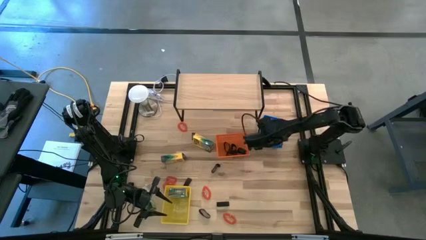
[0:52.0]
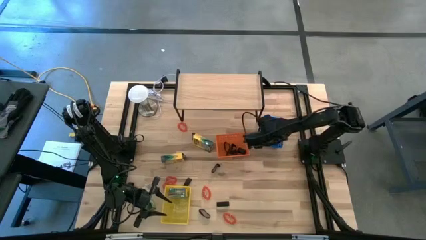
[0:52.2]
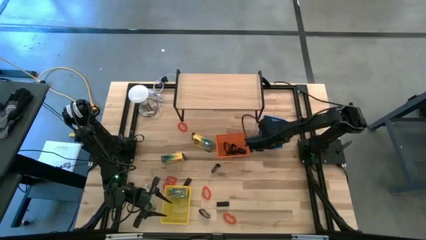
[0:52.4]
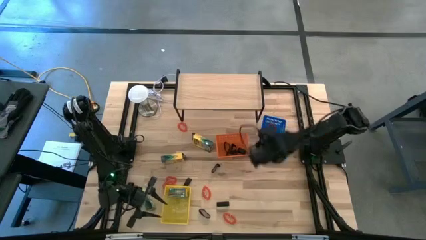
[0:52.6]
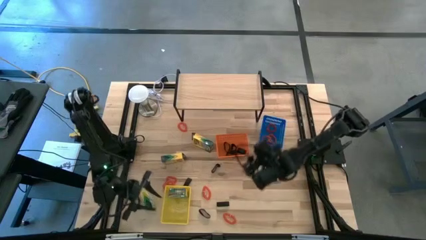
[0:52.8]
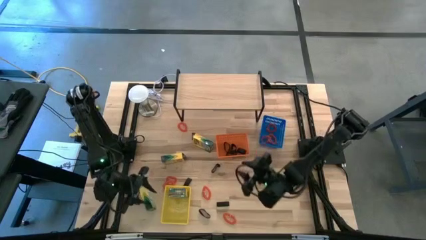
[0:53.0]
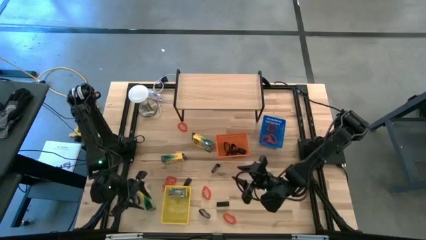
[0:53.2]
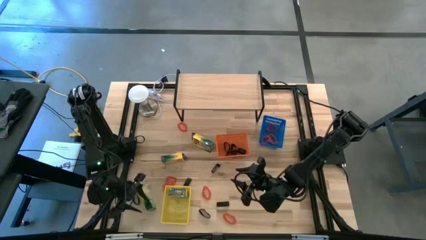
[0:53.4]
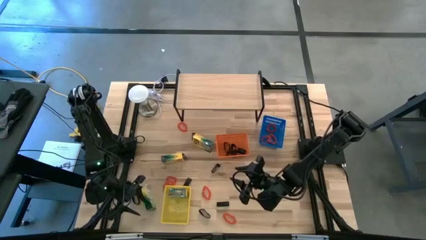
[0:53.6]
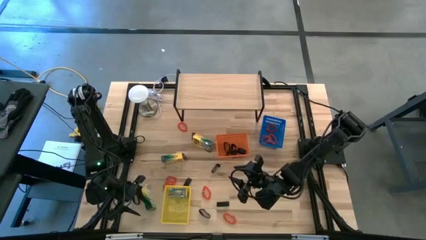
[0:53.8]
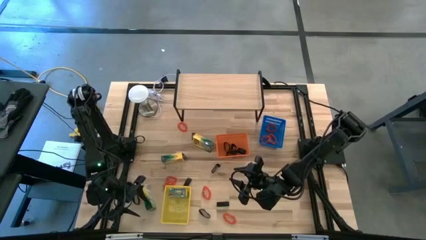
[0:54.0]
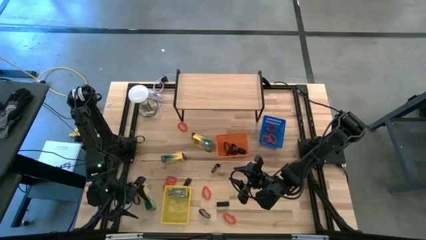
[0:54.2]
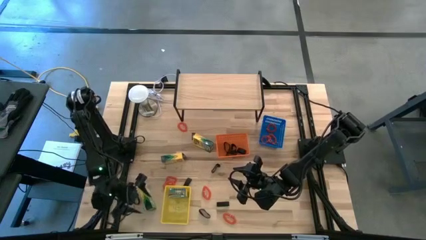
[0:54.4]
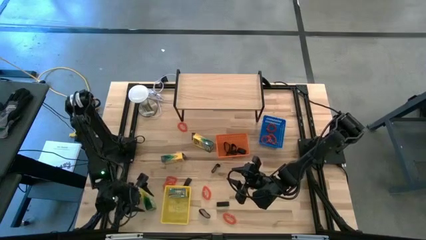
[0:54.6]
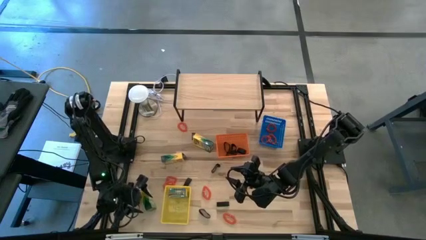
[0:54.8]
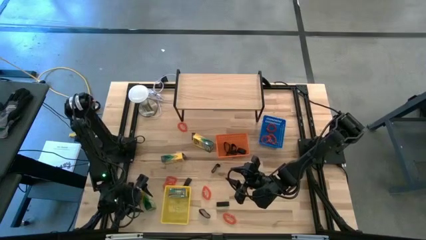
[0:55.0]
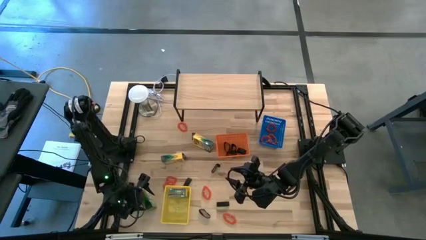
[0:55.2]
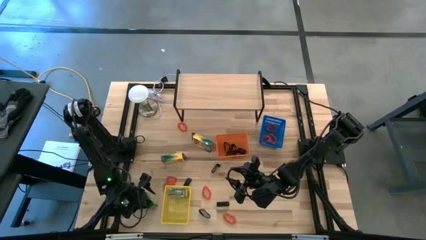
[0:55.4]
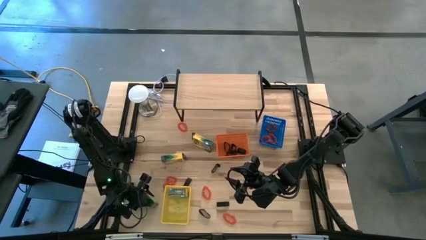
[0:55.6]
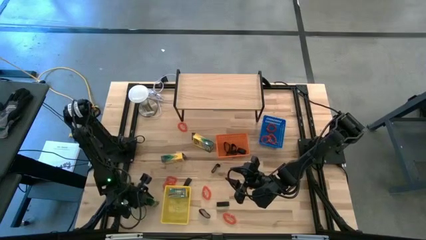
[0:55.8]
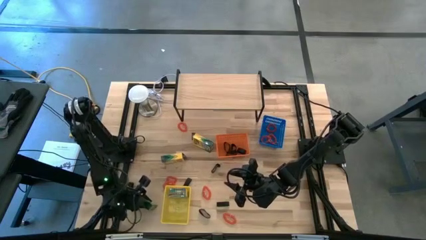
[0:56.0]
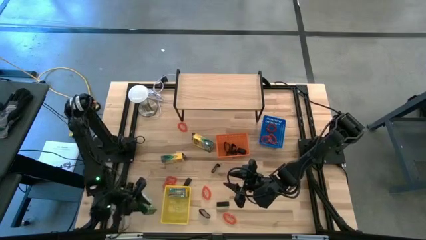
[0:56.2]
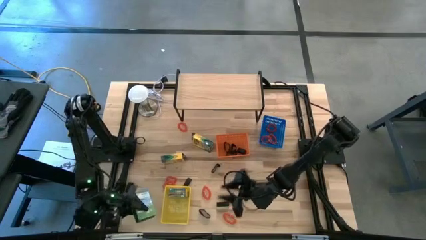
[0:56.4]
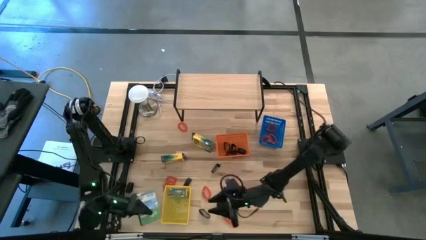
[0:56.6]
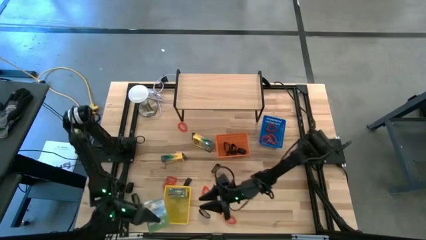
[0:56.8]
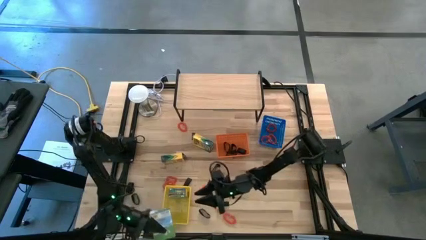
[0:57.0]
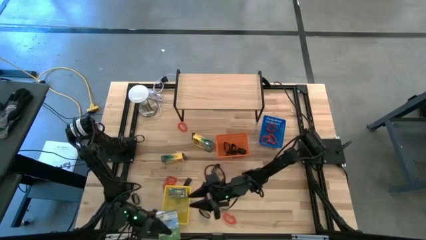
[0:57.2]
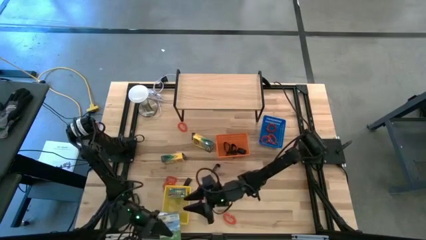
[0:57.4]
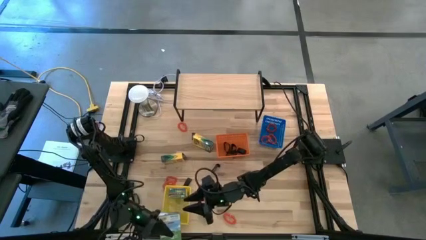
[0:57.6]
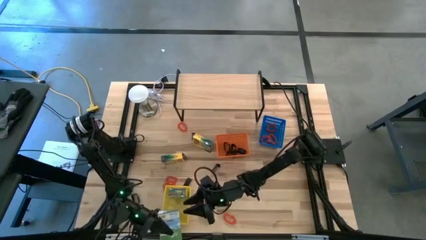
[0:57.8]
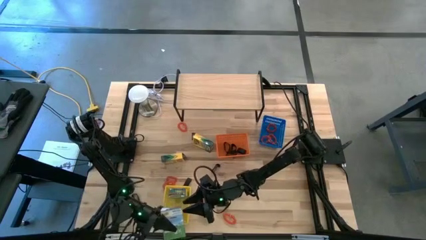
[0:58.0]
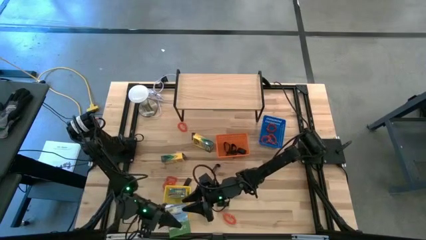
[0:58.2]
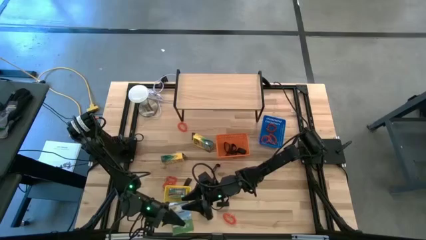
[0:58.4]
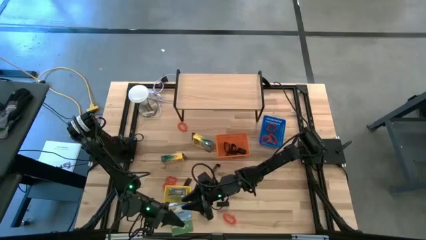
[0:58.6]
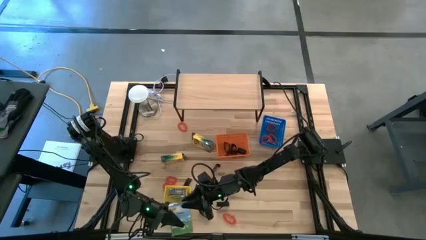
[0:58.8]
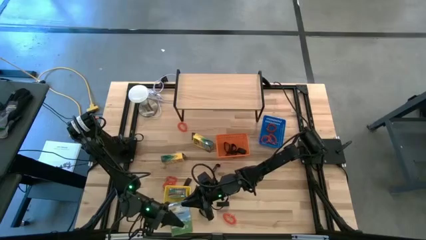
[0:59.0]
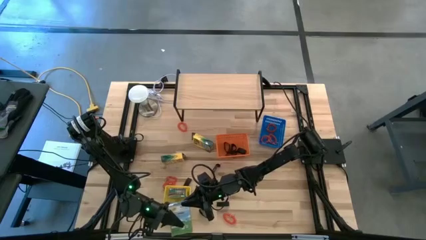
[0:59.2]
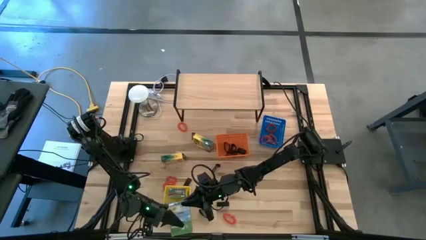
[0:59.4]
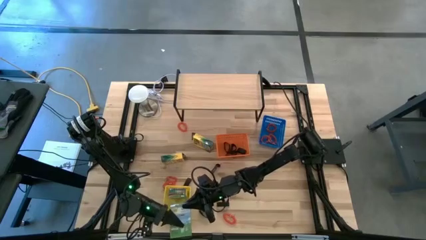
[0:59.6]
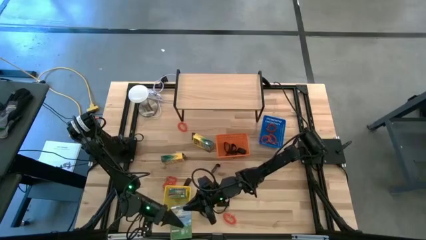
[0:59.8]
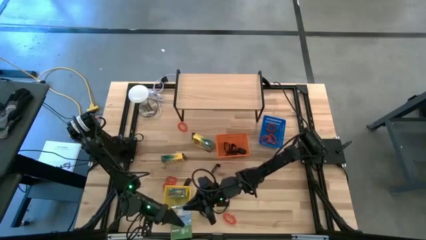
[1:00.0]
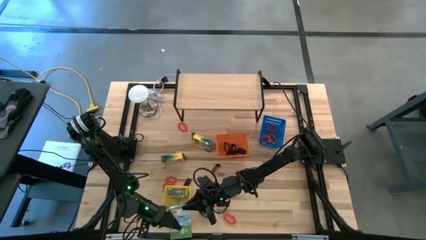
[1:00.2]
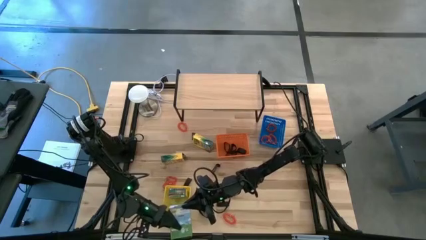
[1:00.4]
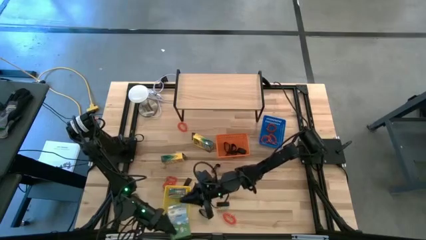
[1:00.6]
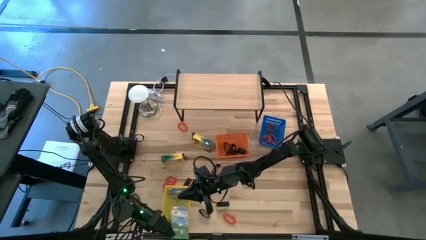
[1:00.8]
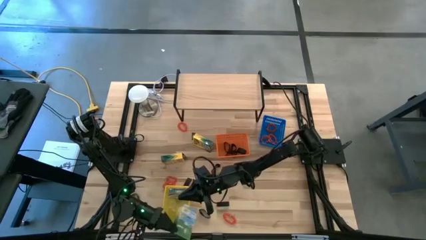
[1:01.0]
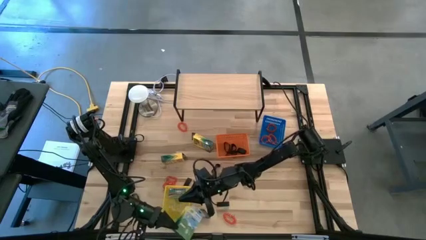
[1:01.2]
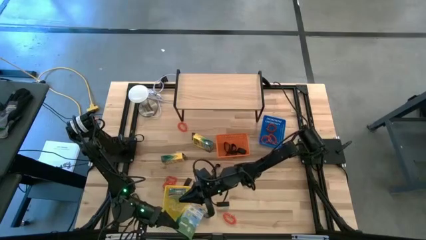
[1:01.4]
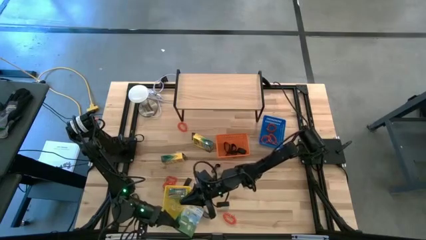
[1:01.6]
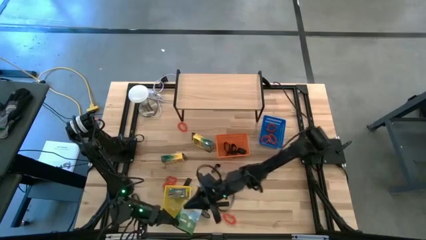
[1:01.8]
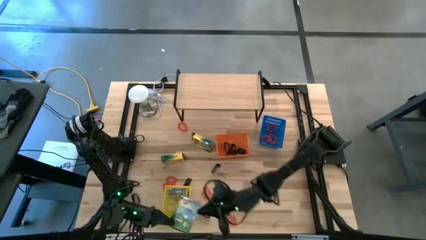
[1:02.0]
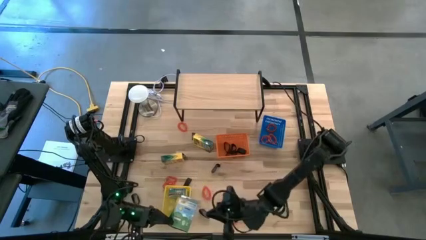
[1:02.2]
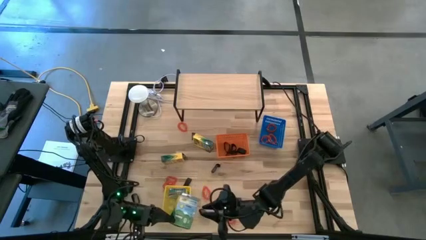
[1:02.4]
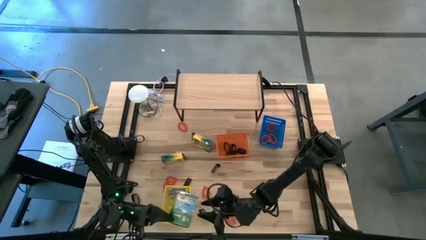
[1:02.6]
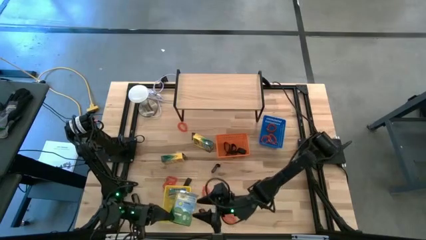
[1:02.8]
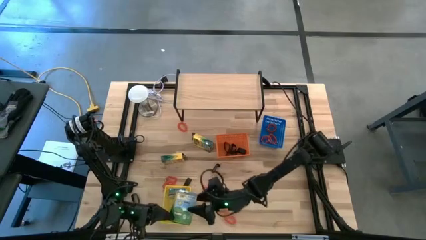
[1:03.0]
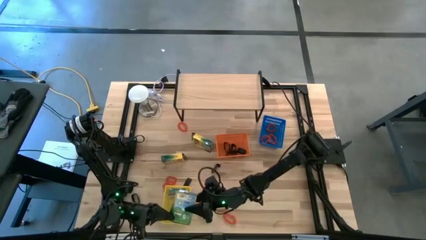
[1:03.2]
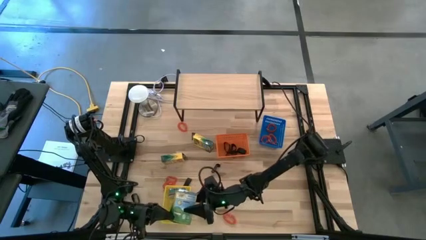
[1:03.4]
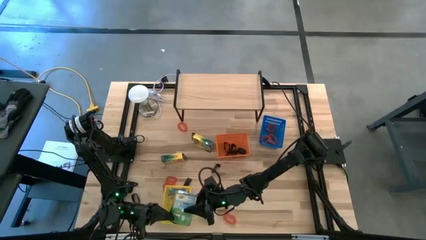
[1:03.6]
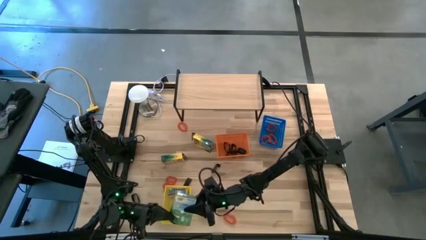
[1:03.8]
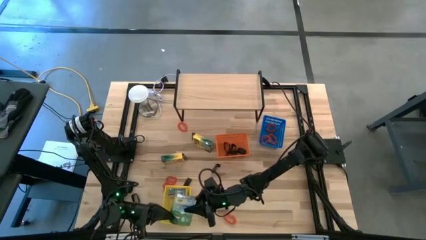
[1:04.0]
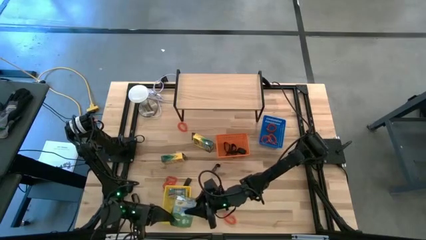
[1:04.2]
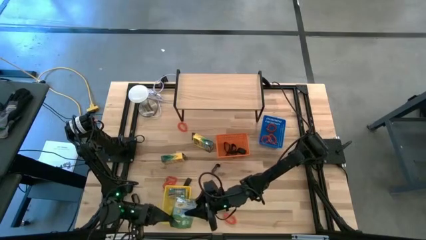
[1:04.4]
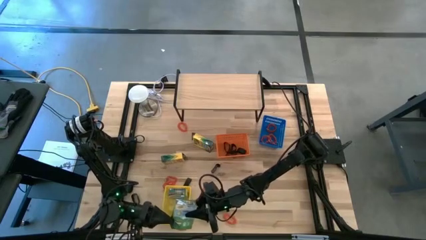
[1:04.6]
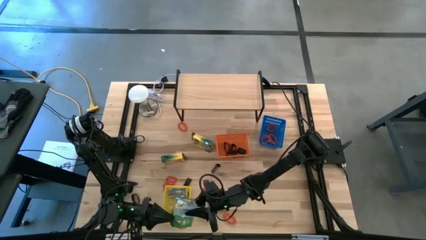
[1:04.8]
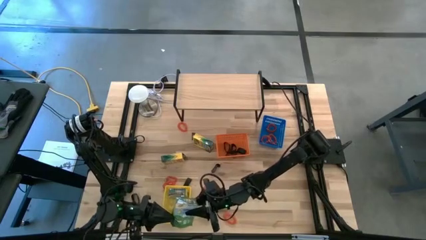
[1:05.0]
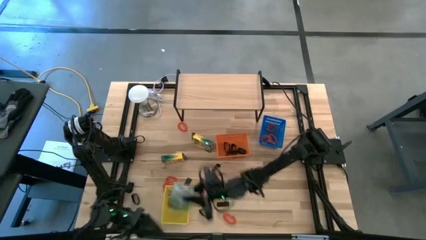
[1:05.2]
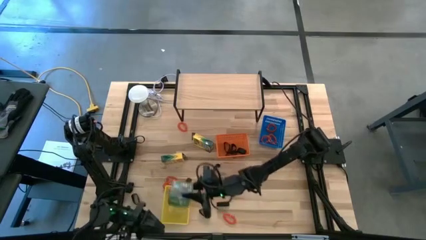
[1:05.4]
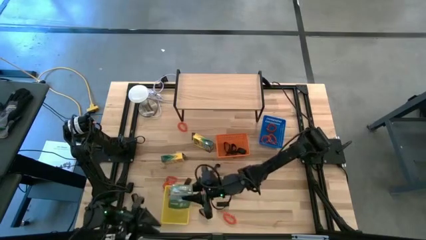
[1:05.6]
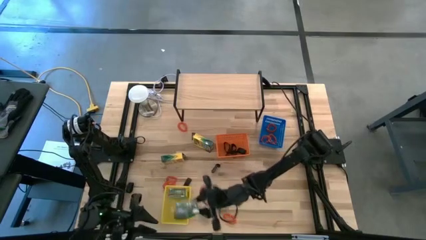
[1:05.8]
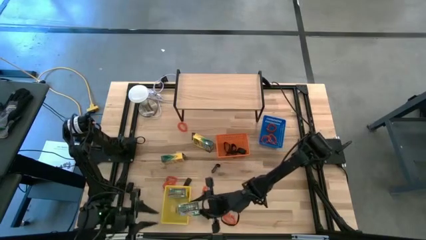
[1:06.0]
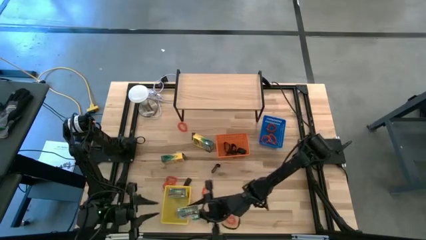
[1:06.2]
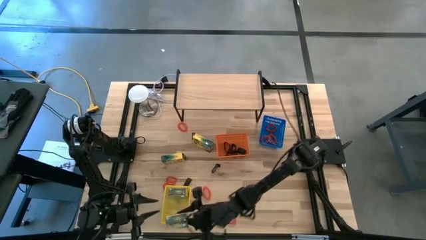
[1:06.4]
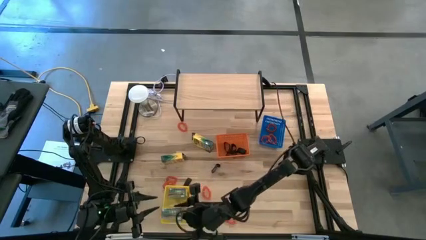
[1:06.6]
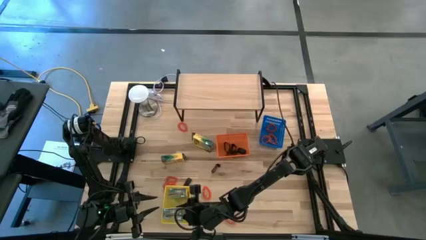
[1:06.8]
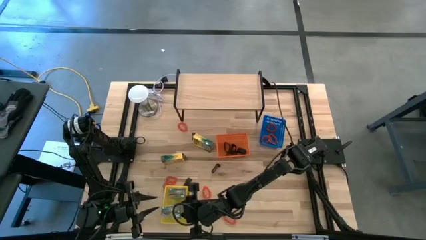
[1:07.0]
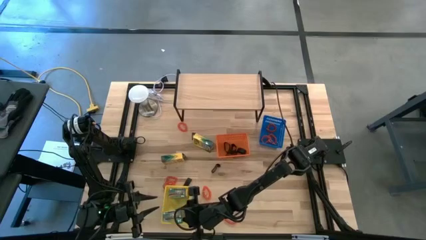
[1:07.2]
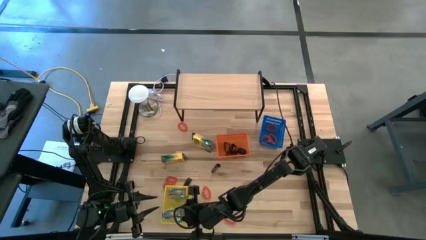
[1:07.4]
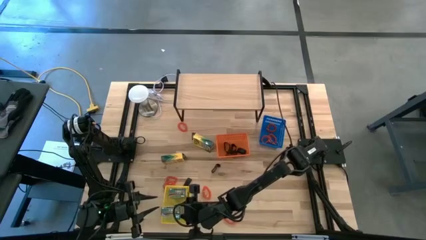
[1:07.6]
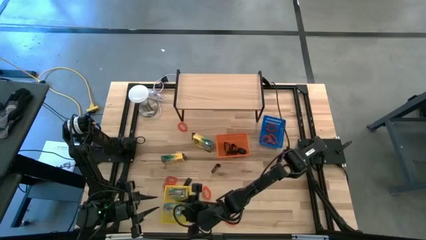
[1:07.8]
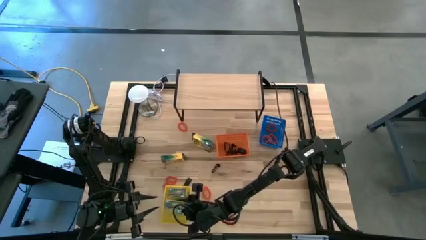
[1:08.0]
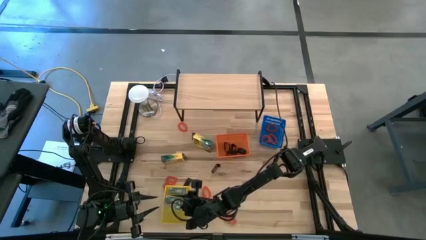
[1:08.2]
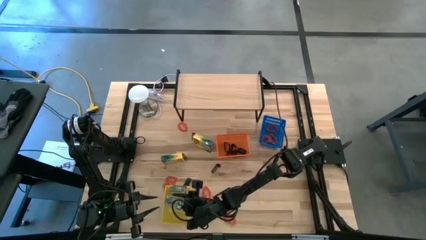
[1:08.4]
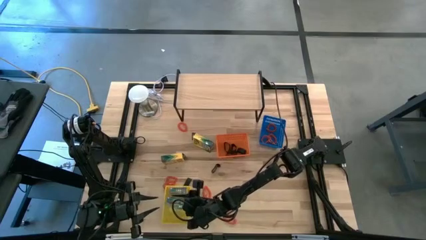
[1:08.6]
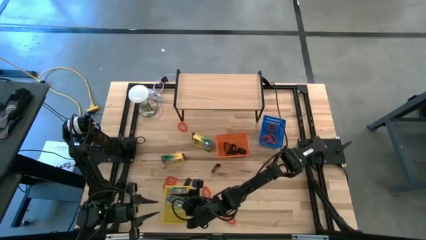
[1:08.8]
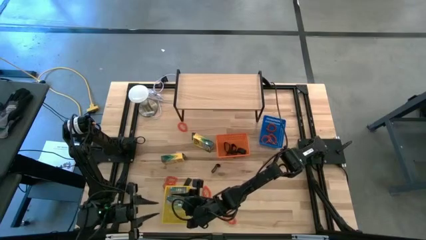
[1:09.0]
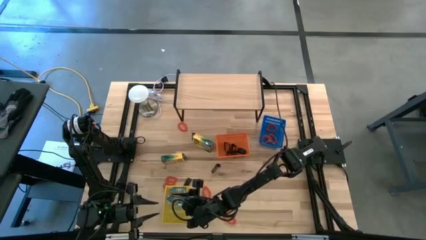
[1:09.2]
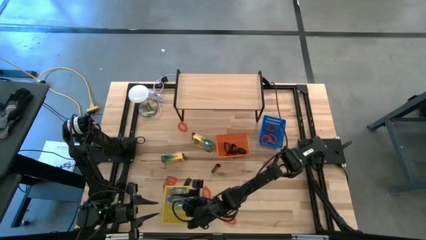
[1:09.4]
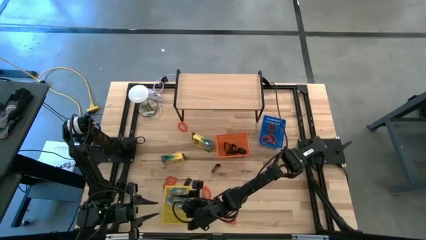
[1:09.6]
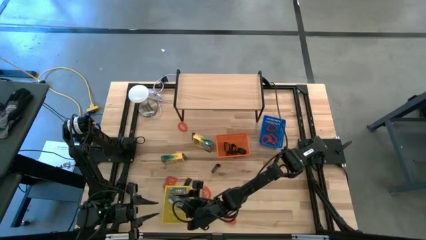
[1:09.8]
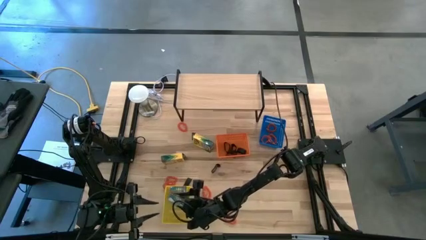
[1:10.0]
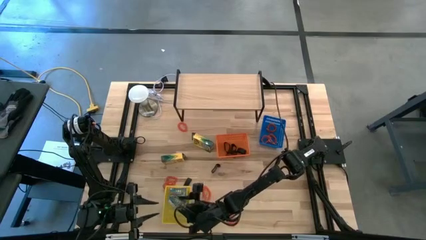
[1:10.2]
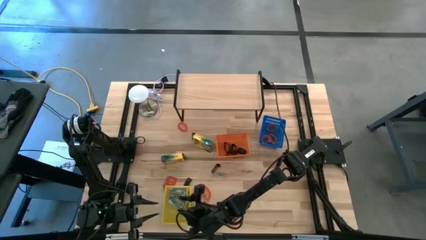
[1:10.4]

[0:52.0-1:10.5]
Task: Pick & Place Office Desk Supplies
Put the crayon box into the yellow bin
